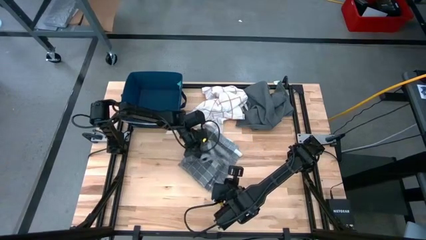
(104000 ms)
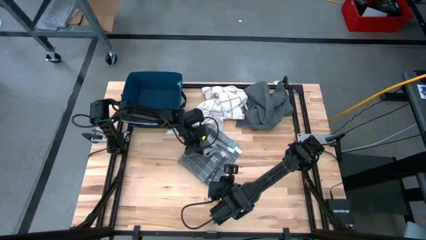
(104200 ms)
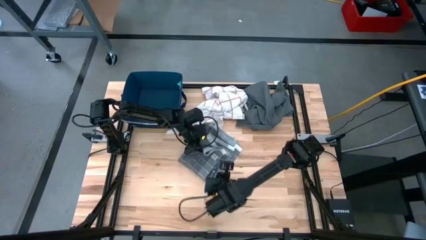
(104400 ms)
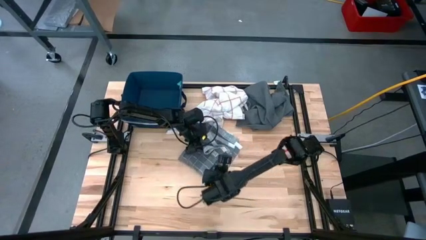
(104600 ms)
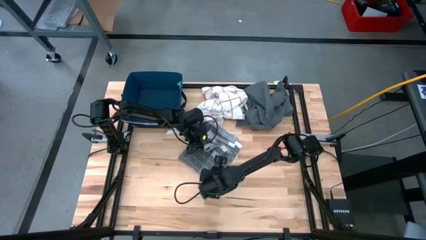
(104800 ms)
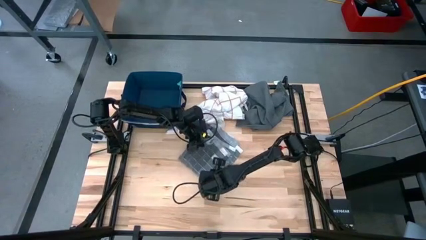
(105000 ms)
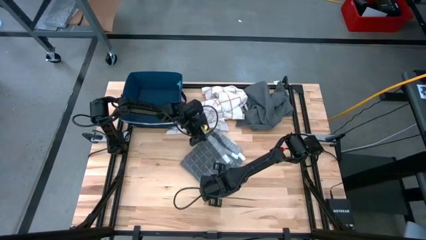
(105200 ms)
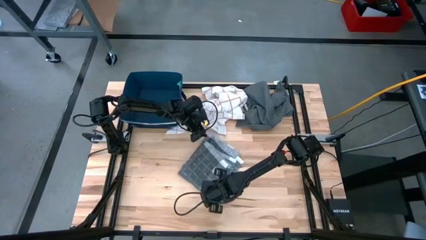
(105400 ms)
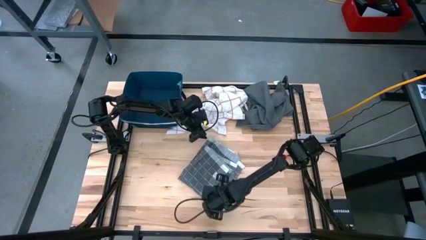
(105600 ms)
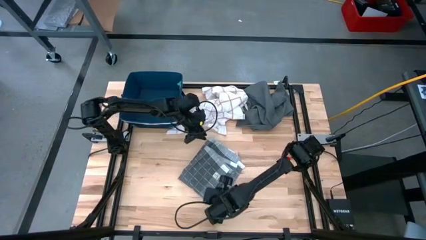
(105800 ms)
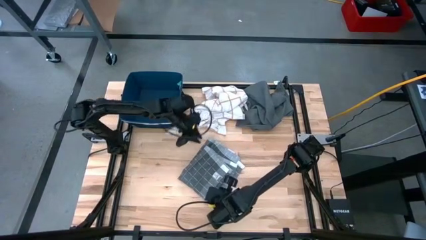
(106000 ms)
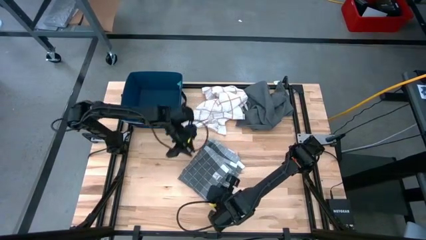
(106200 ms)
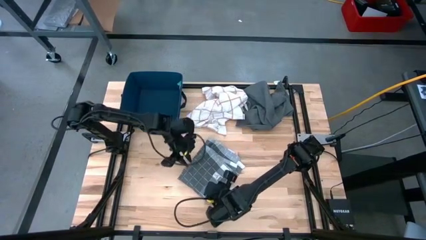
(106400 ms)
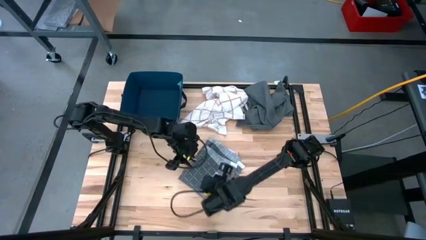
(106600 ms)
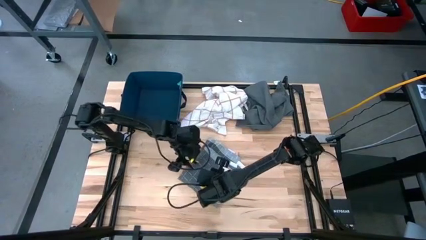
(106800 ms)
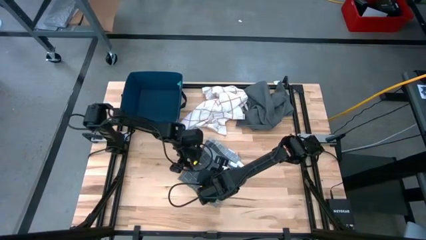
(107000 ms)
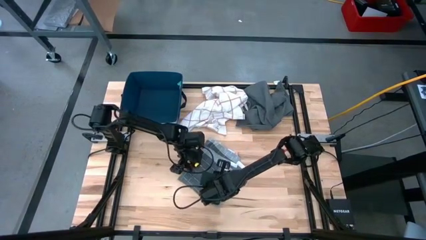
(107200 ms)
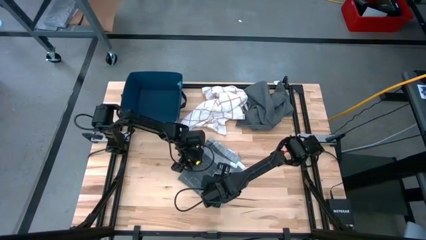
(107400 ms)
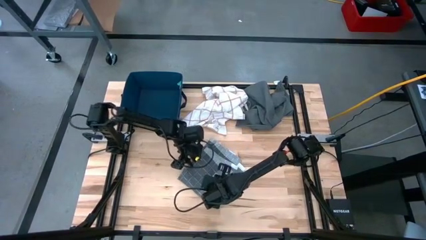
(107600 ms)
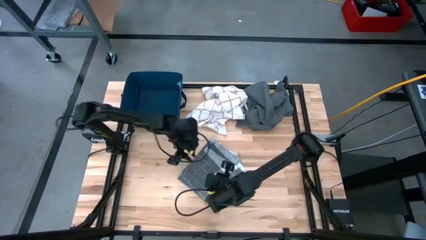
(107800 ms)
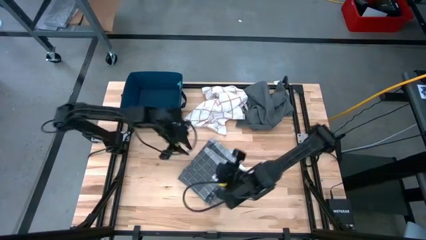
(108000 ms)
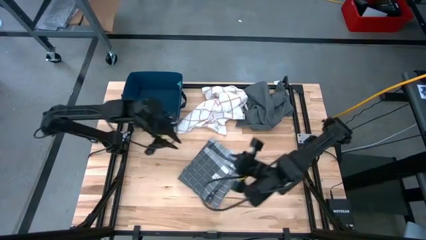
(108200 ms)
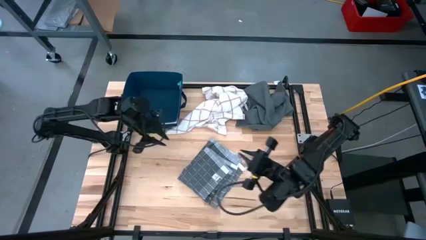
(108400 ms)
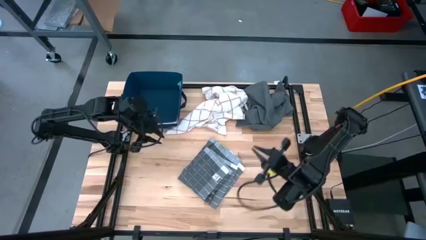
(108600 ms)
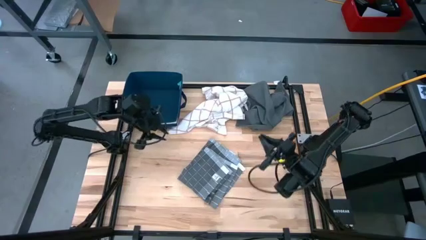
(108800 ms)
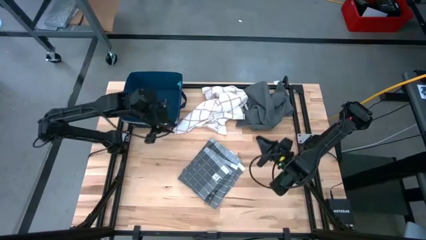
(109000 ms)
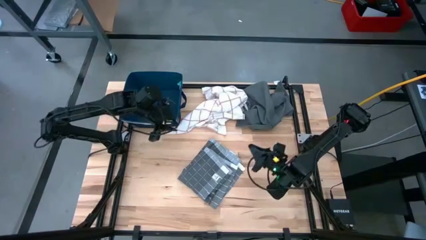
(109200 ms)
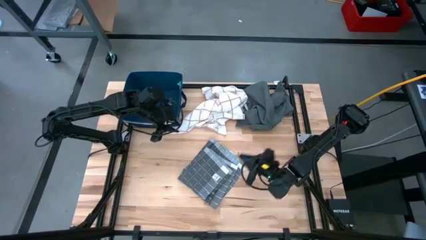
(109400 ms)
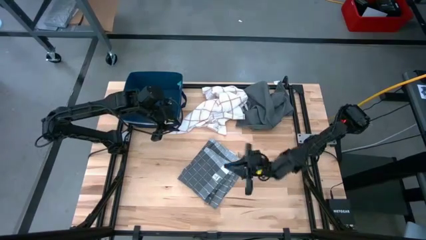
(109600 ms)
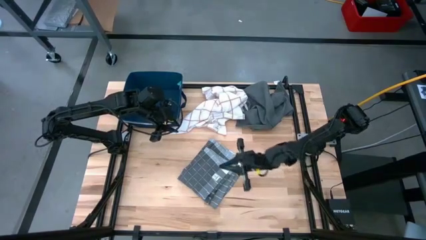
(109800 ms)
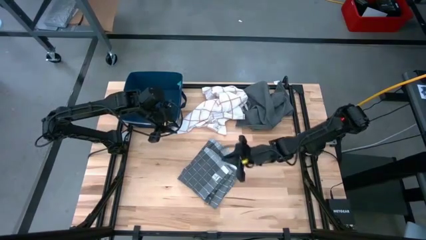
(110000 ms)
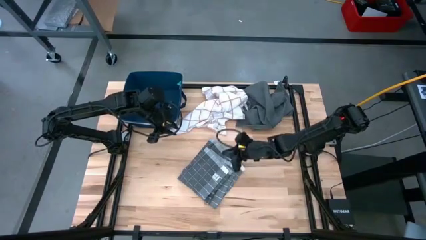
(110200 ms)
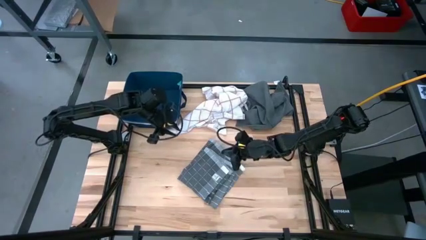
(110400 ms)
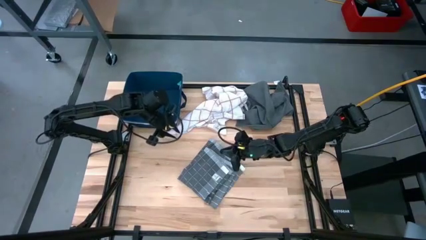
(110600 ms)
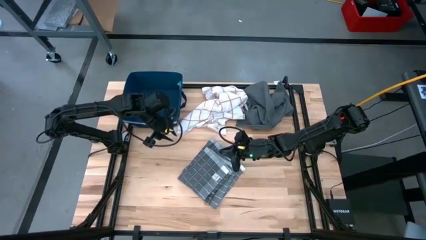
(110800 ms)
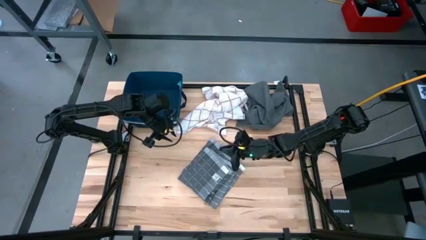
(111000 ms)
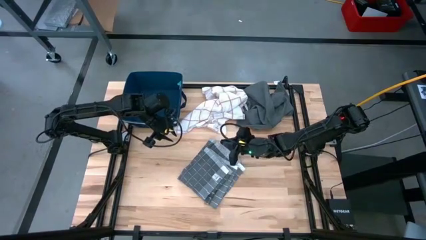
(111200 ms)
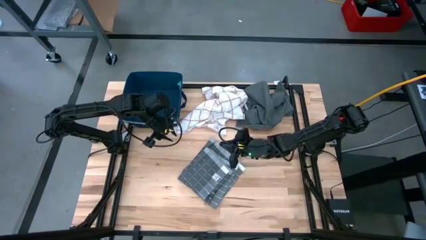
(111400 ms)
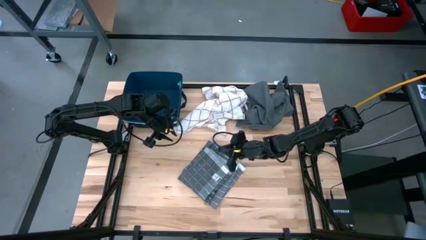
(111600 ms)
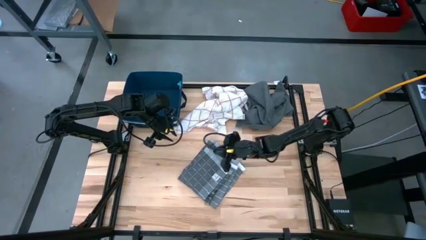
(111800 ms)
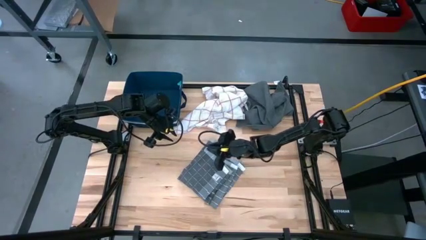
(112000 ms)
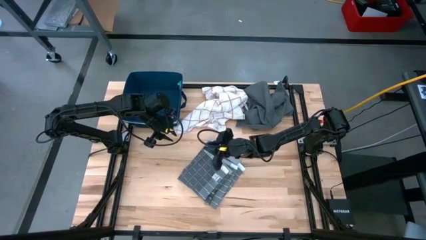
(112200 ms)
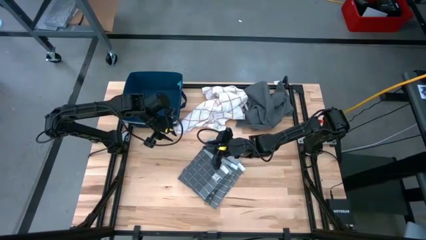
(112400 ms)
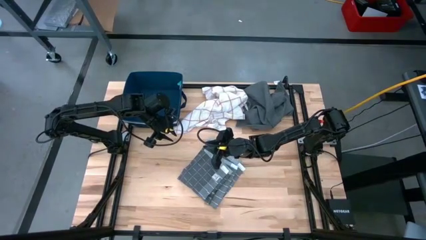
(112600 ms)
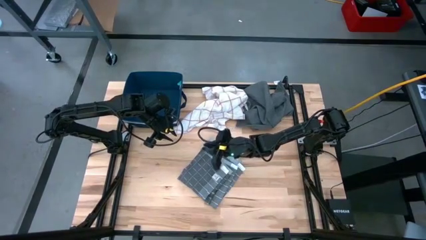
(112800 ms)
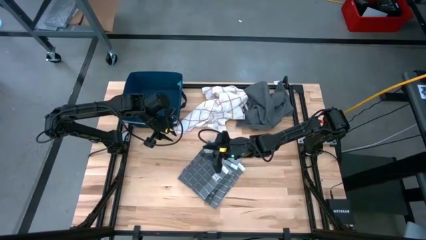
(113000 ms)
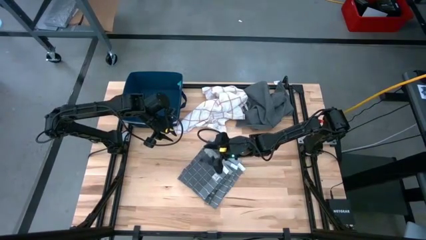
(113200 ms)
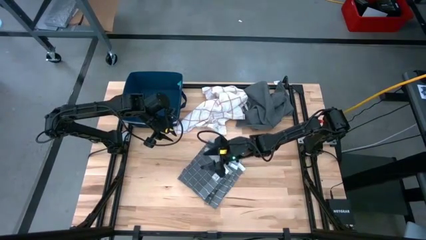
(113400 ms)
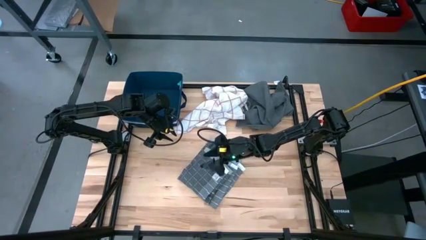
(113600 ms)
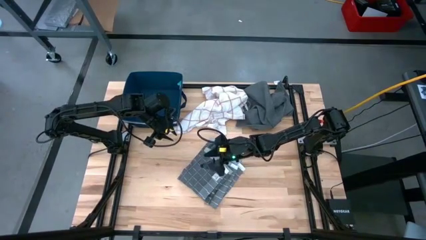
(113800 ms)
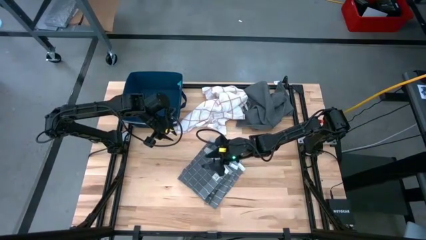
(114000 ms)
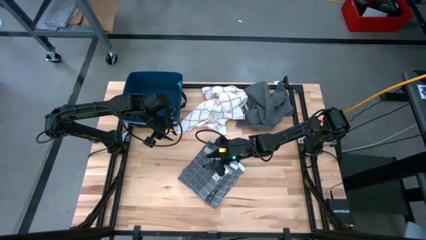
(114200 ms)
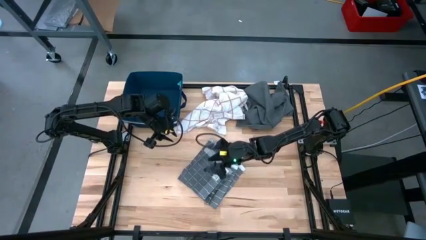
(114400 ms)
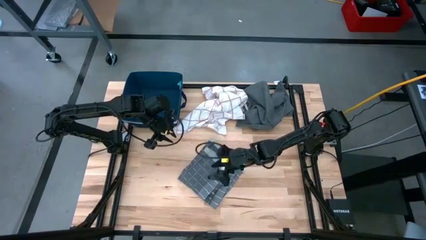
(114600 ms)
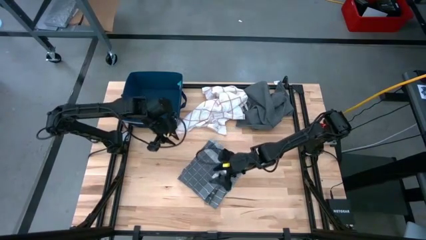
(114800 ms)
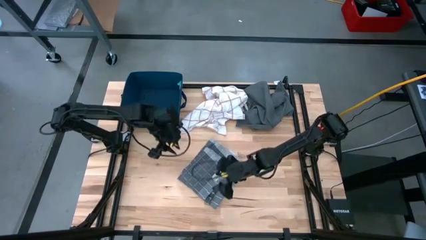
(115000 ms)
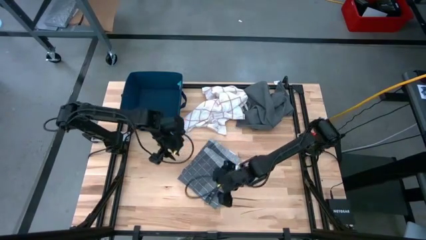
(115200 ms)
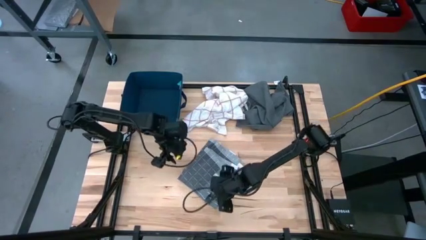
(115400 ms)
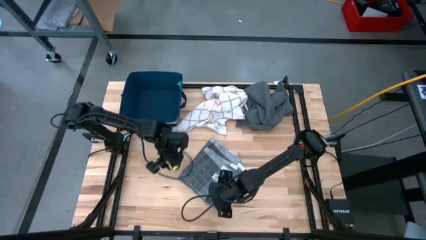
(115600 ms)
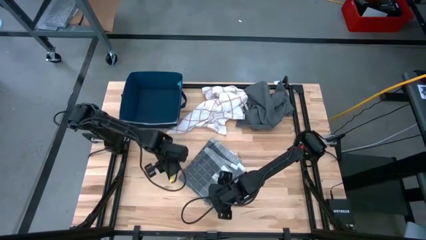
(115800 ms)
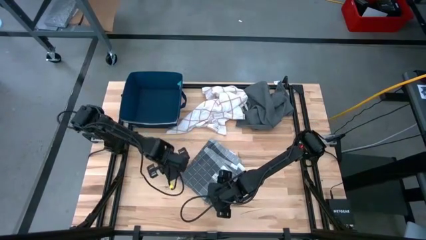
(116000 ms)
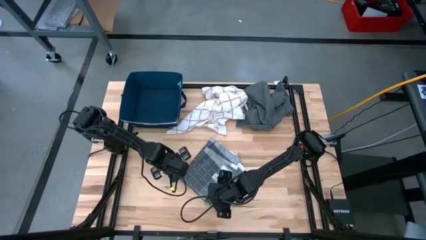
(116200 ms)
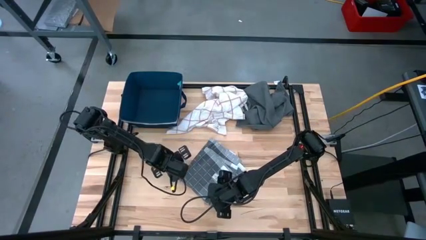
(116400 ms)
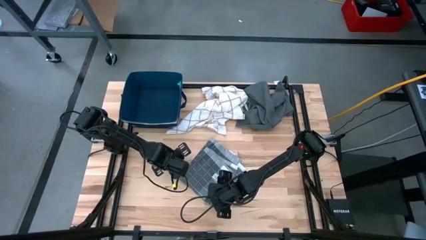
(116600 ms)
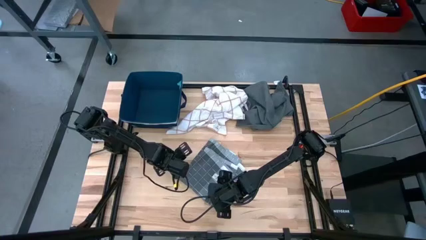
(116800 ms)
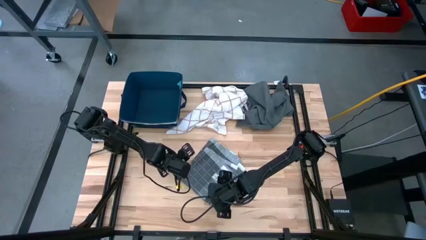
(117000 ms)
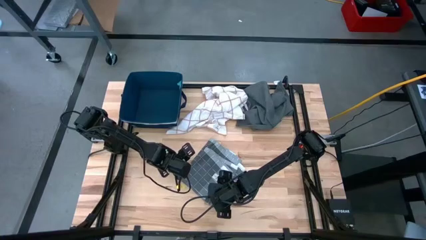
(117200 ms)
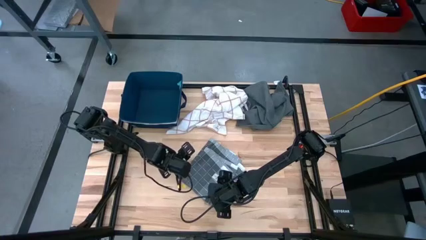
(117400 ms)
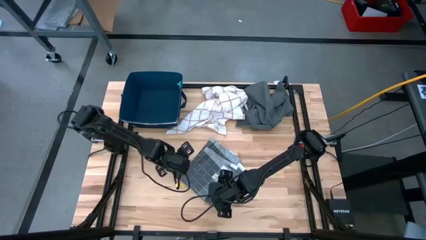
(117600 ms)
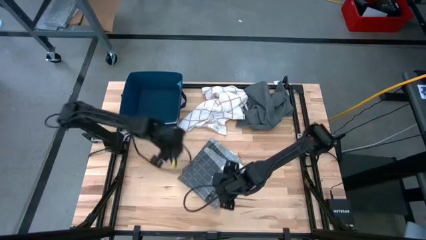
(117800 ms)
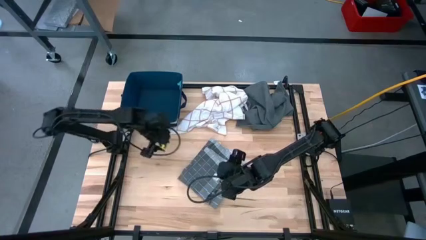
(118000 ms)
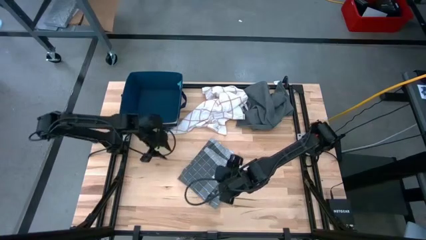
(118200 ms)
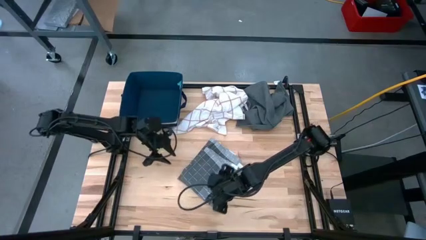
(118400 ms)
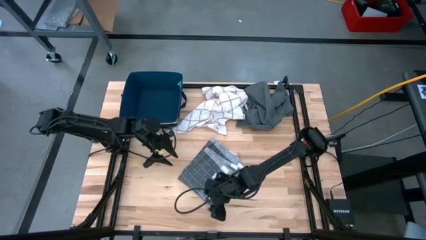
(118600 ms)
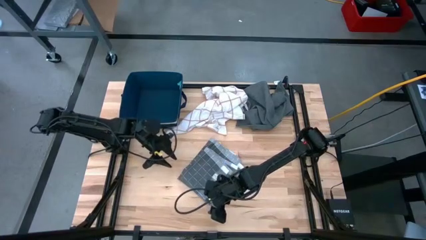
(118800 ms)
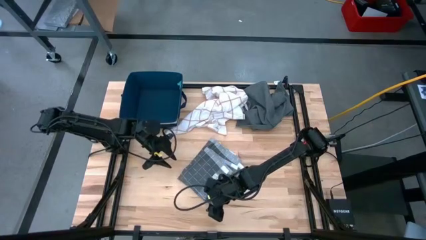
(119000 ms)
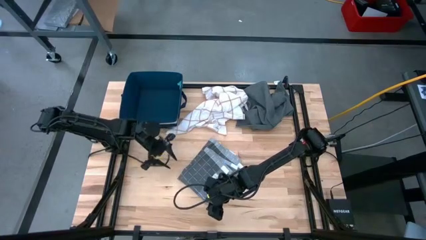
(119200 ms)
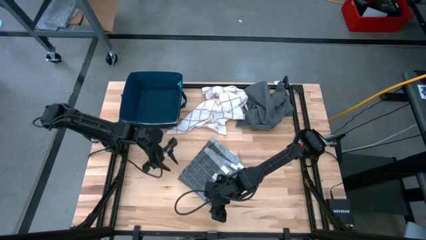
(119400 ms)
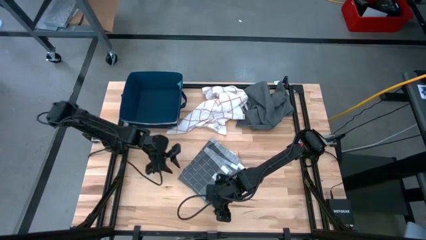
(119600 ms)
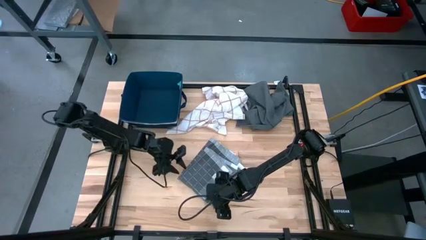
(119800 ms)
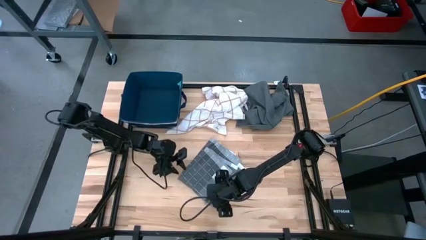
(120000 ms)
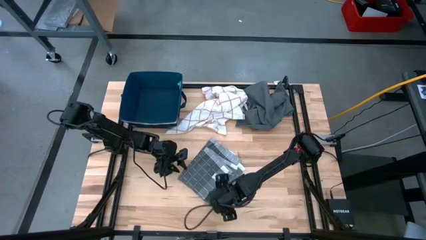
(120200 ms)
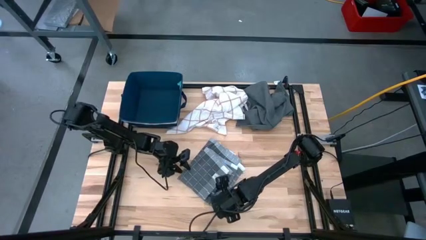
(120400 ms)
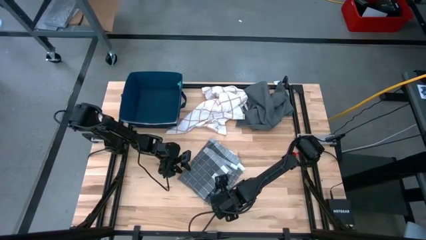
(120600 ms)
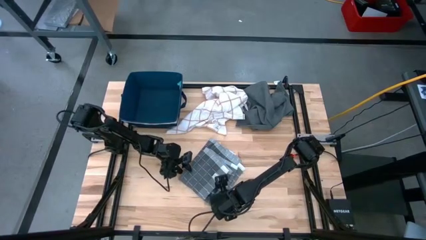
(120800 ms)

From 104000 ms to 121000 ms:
Task: Fold towel
Fold the gray patterned towel
